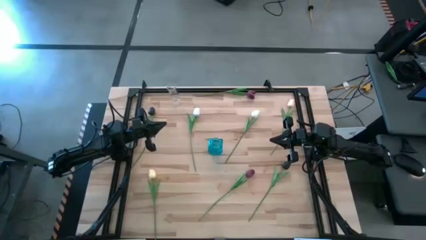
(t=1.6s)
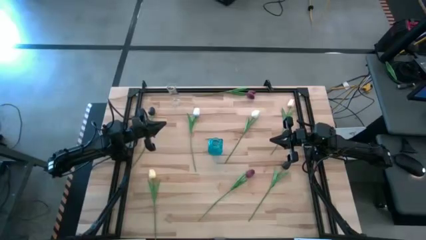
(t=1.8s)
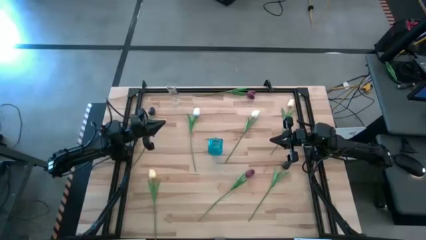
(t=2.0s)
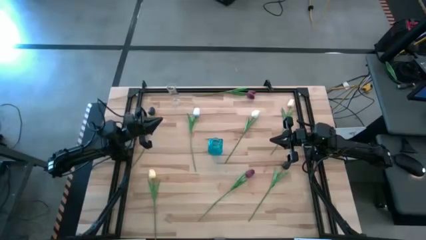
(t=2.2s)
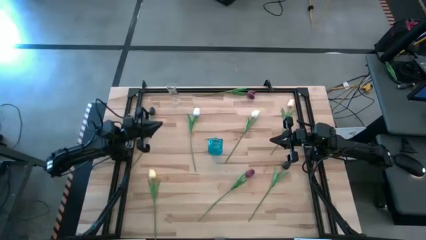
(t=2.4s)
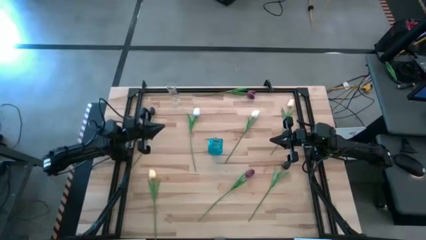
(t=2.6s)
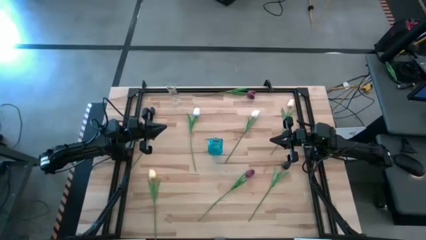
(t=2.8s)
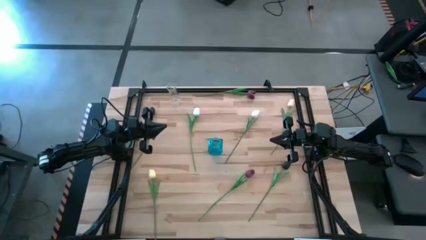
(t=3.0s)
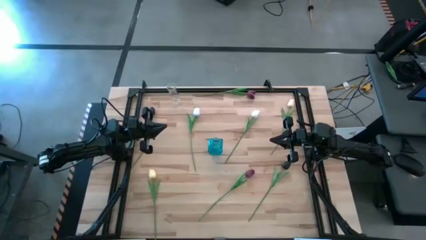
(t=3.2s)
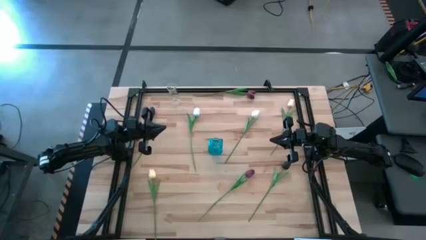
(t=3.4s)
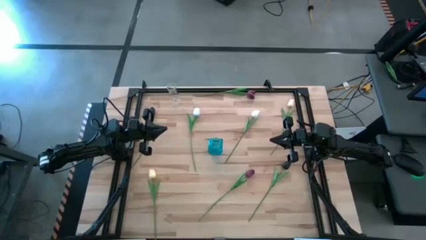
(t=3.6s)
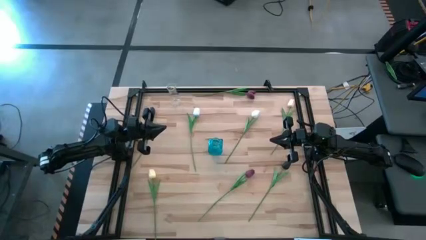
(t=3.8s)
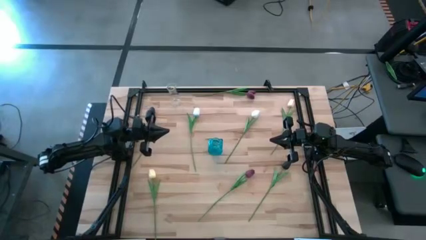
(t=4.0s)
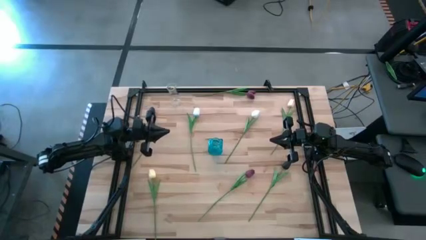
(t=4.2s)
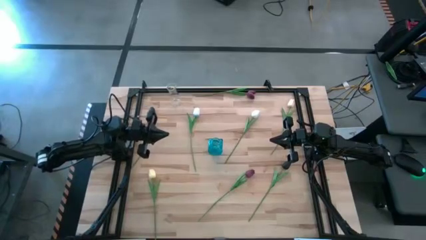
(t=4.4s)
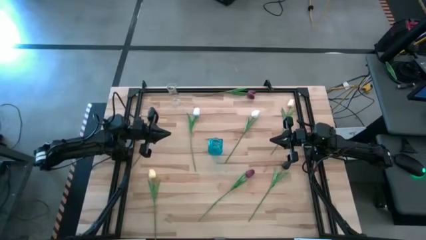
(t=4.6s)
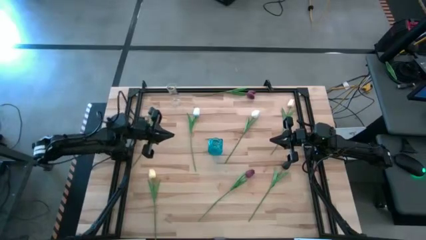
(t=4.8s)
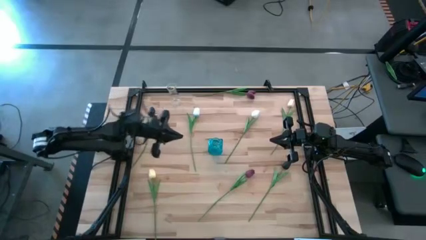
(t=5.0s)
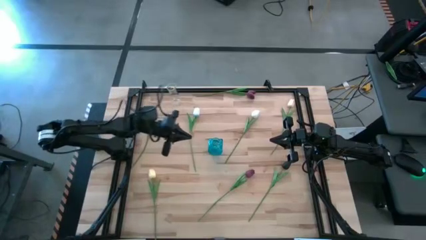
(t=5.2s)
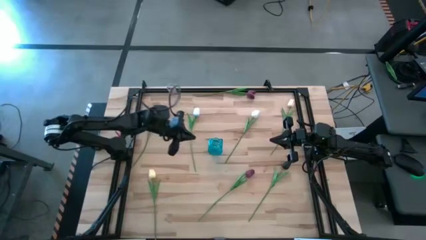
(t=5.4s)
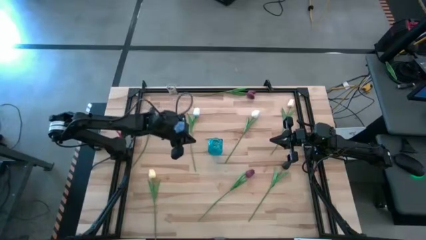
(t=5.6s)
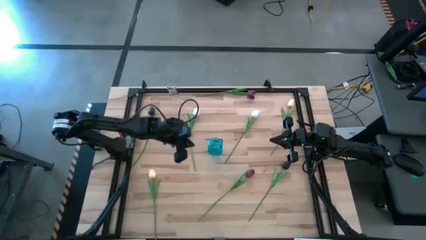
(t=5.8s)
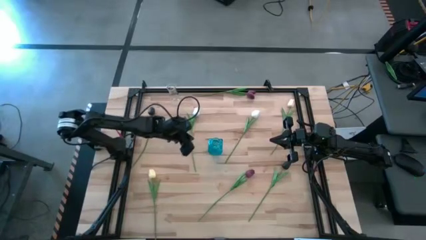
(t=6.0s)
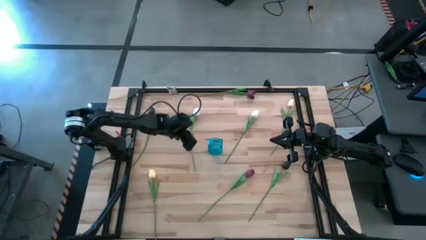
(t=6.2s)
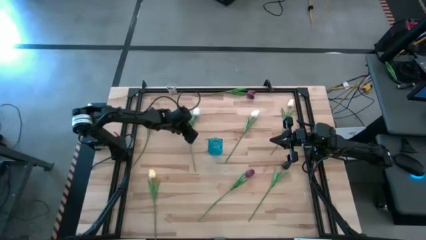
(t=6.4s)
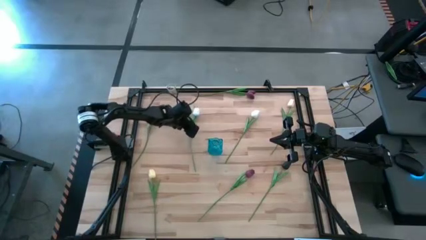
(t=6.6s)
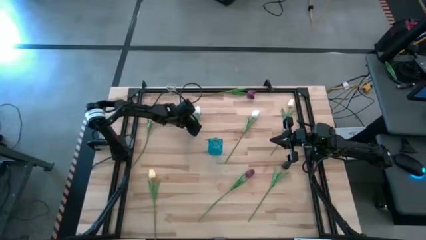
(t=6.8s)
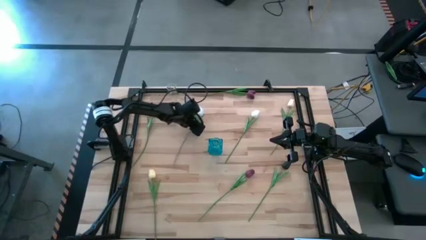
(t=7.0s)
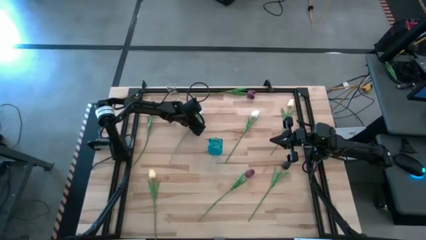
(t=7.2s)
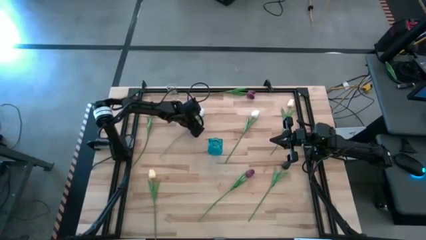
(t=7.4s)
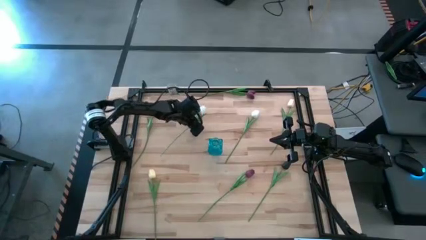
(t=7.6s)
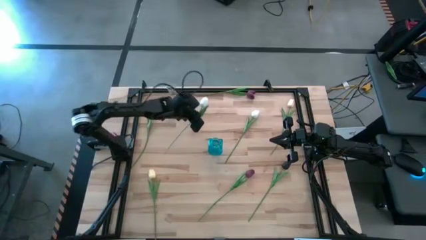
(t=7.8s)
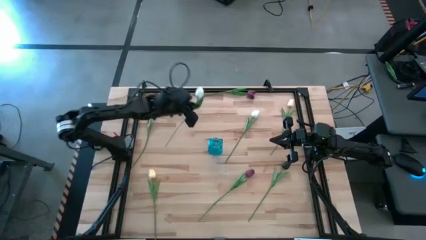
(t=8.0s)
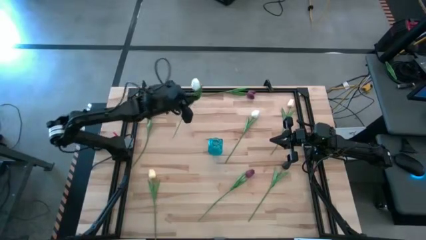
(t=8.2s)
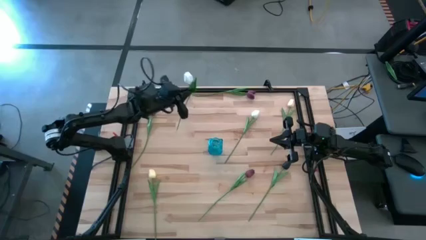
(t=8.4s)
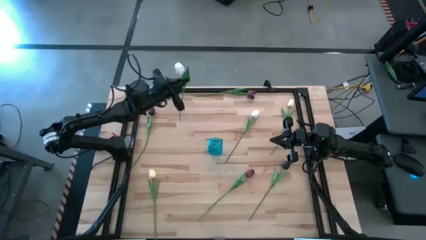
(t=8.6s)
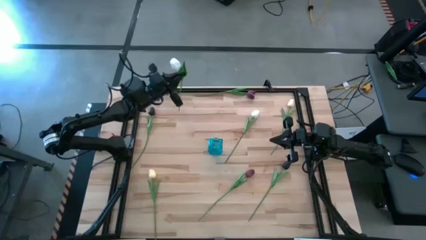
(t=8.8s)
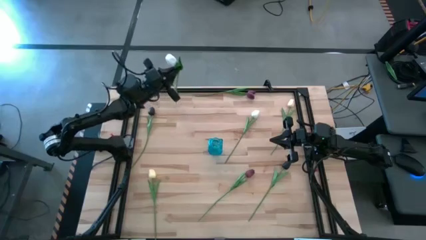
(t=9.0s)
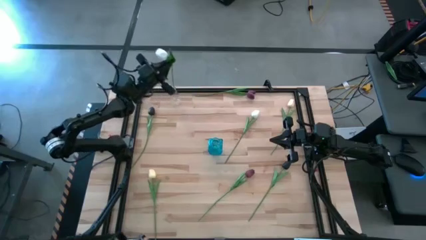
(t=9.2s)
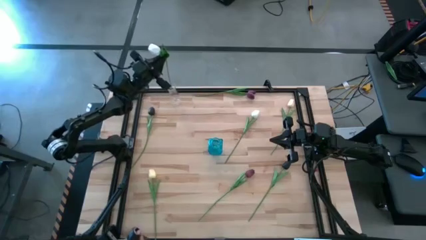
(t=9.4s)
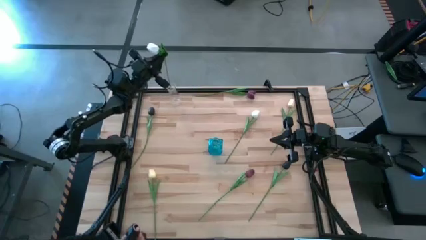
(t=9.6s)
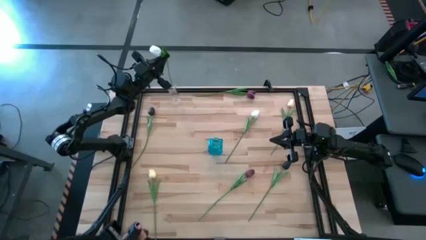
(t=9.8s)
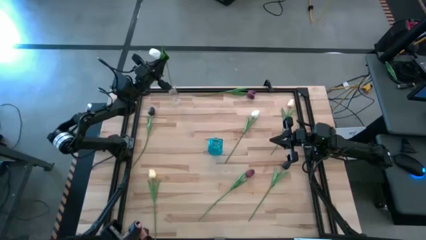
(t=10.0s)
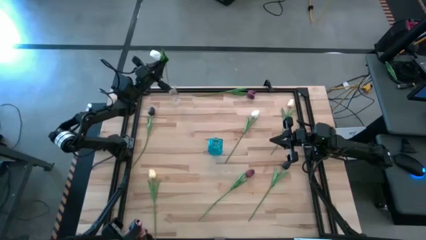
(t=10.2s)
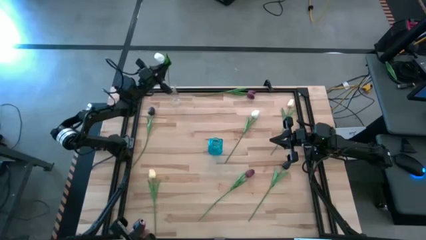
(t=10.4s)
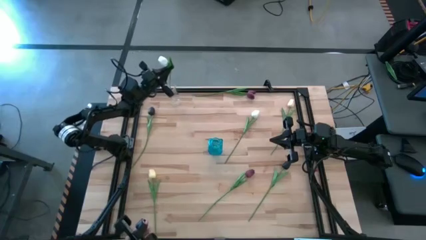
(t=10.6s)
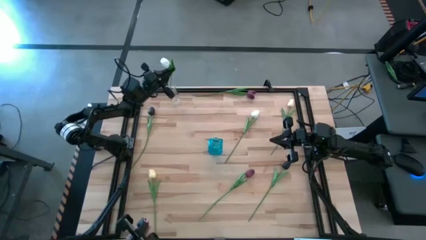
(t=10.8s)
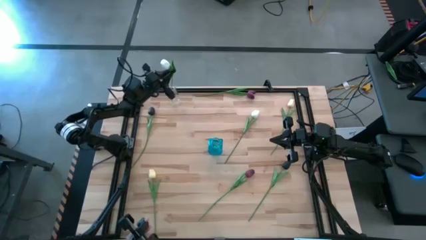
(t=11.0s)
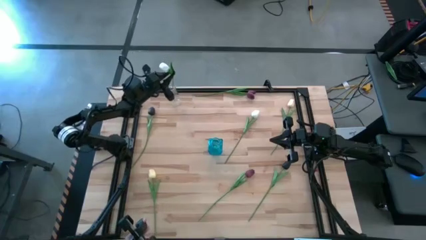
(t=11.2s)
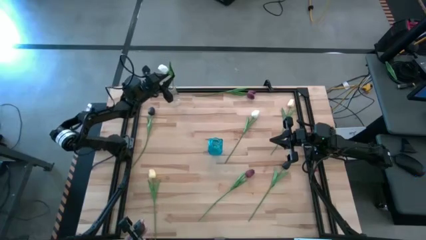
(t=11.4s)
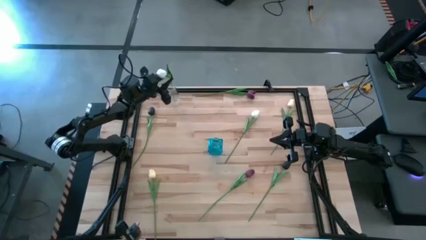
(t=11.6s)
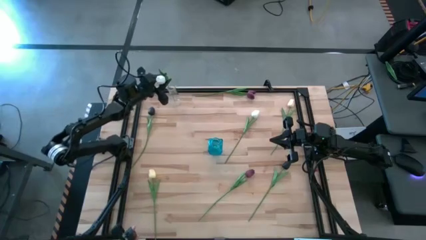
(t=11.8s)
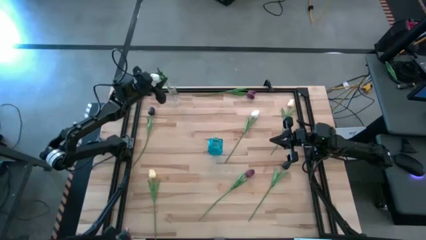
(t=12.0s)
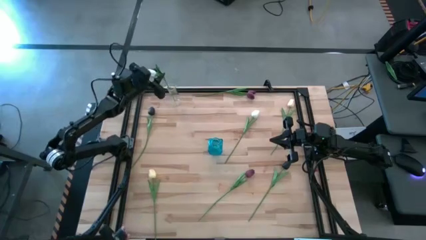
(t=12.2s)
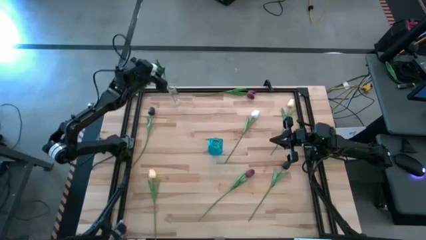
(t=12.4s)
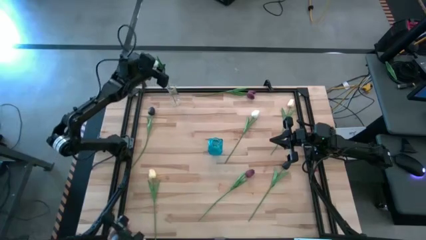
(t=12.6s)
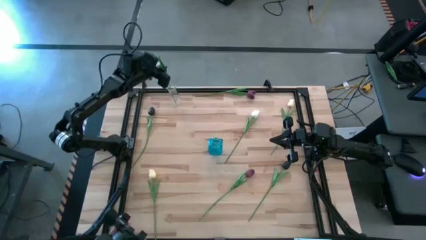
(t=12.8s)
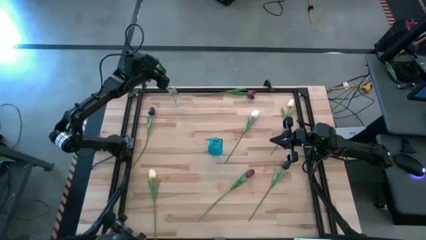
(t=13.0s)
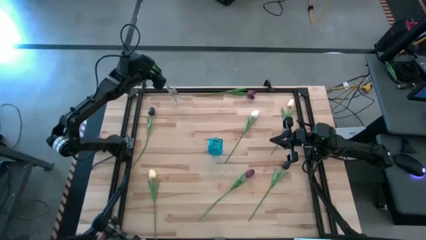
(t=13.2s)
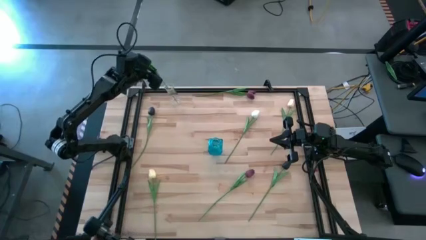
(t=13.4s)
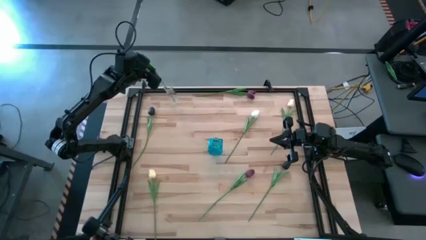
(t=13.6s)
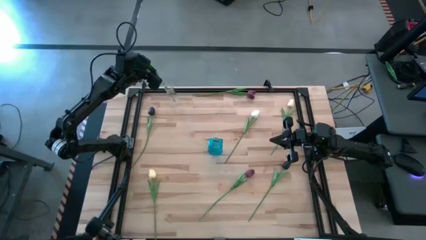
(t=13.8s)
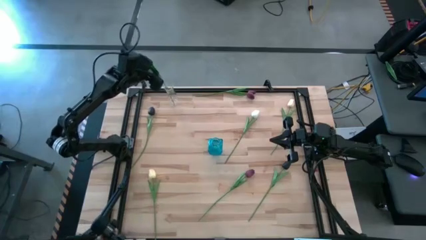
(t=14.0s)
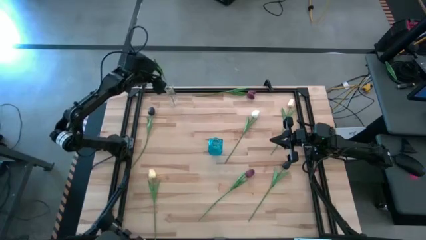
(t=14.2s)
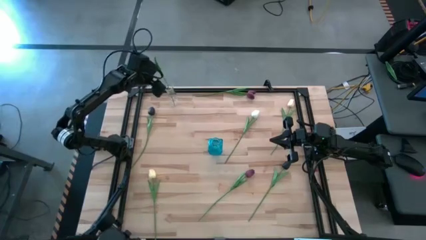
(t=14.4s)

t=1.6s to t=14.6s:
Task: Sort flowers into vase by color
Put the left white flower into the transparent vase
